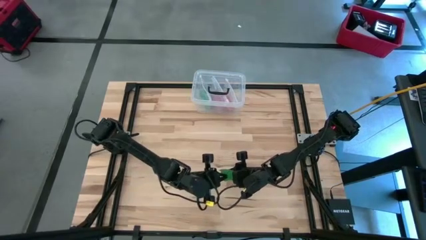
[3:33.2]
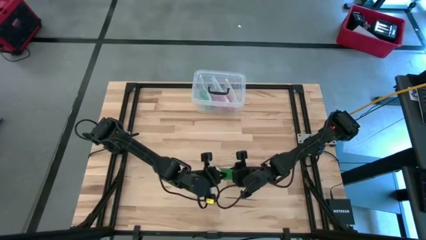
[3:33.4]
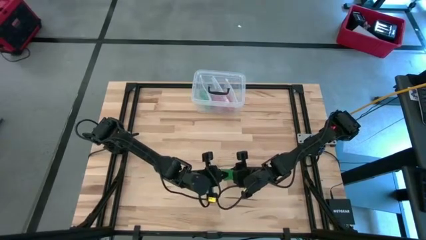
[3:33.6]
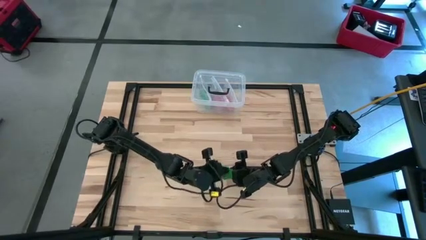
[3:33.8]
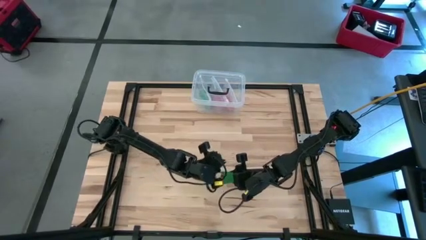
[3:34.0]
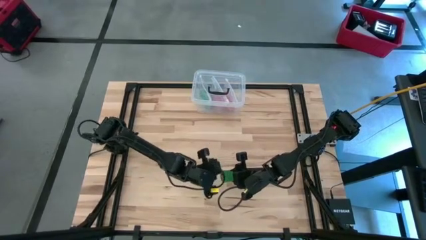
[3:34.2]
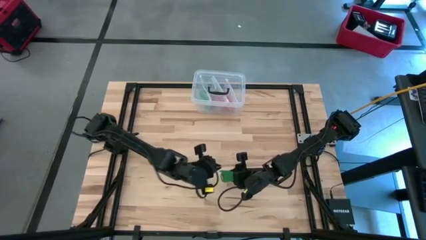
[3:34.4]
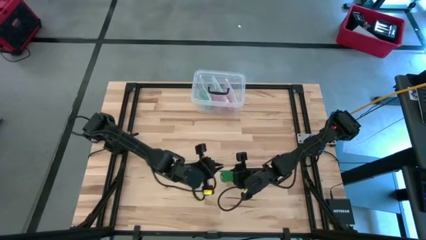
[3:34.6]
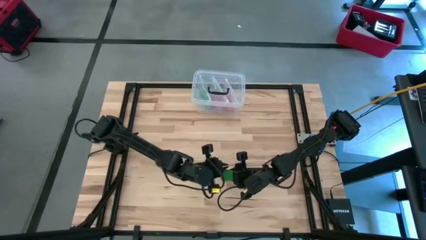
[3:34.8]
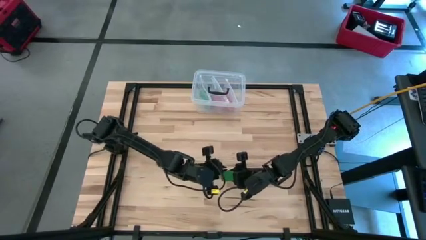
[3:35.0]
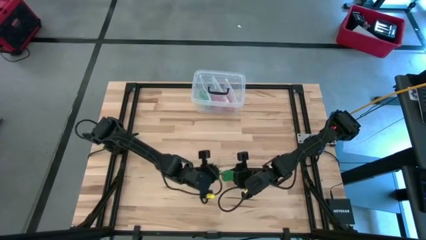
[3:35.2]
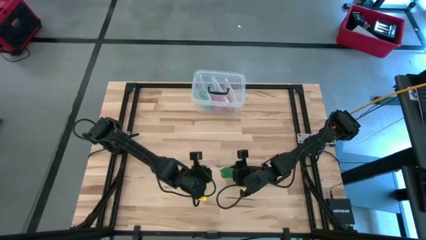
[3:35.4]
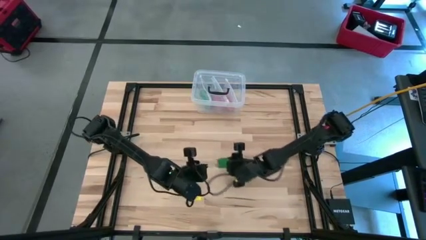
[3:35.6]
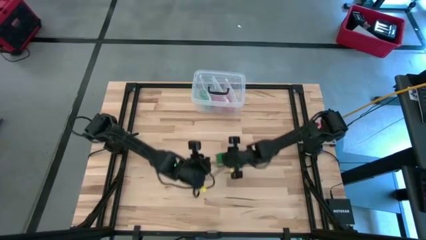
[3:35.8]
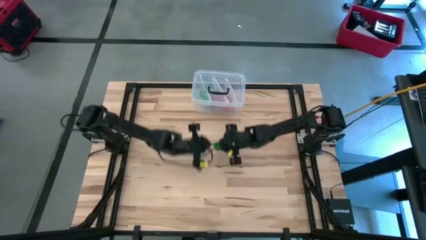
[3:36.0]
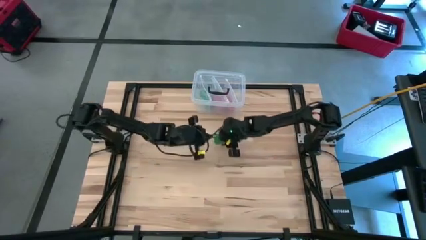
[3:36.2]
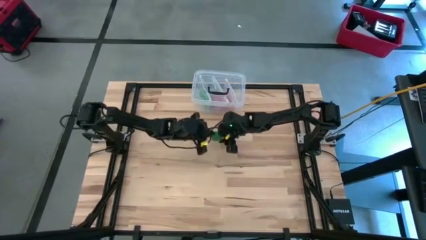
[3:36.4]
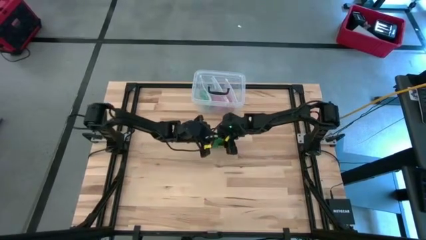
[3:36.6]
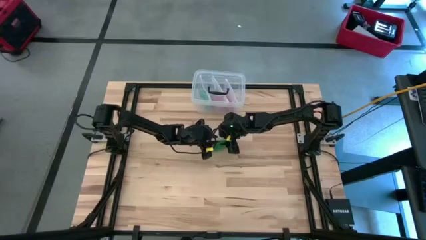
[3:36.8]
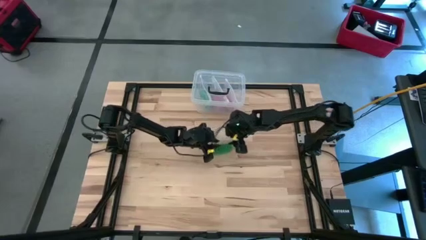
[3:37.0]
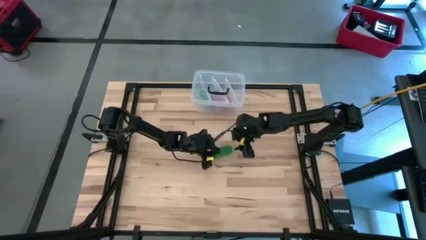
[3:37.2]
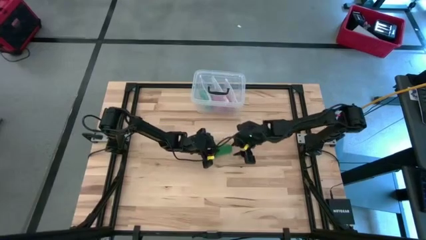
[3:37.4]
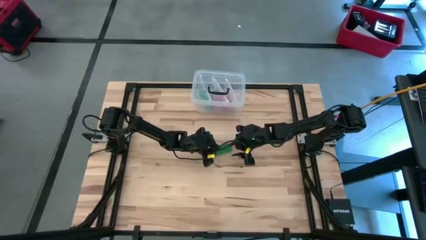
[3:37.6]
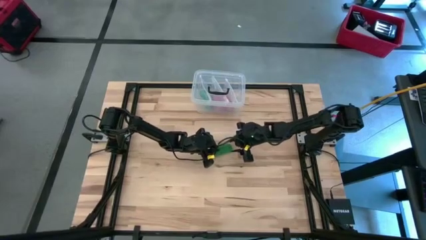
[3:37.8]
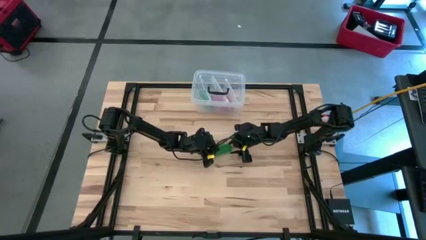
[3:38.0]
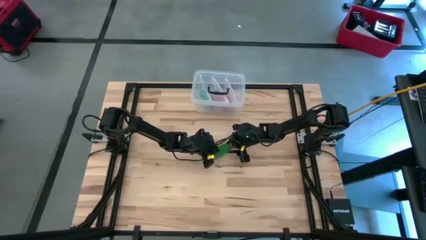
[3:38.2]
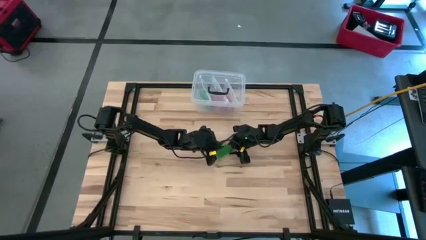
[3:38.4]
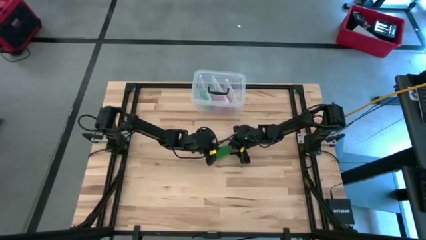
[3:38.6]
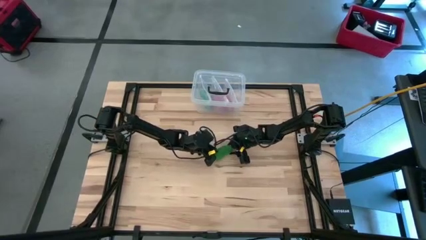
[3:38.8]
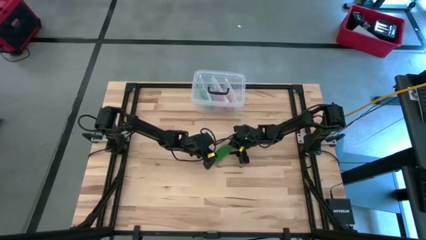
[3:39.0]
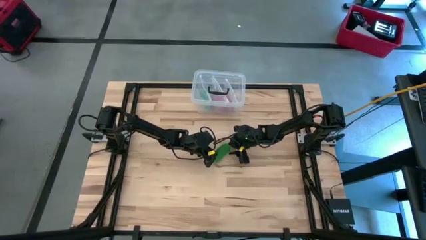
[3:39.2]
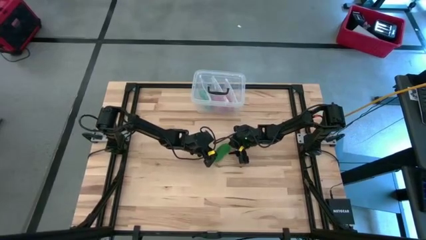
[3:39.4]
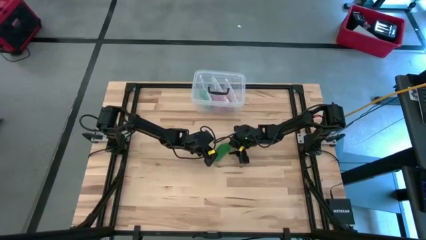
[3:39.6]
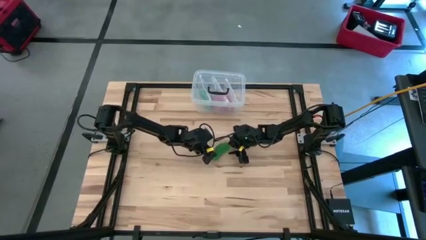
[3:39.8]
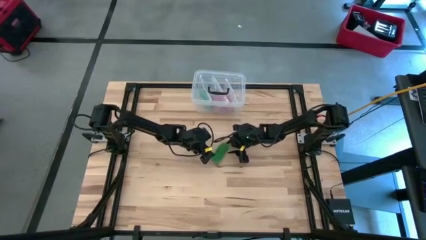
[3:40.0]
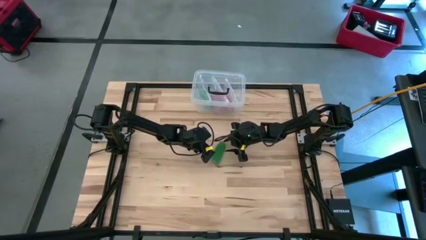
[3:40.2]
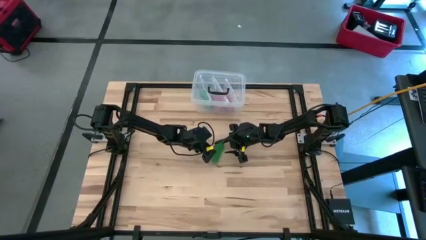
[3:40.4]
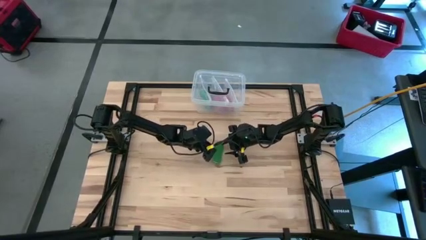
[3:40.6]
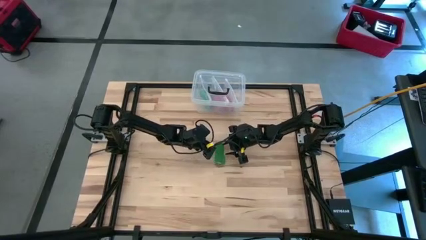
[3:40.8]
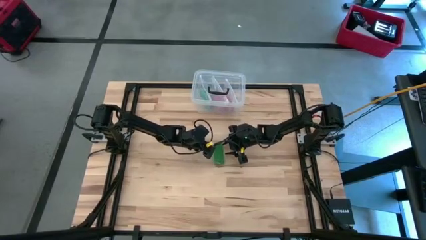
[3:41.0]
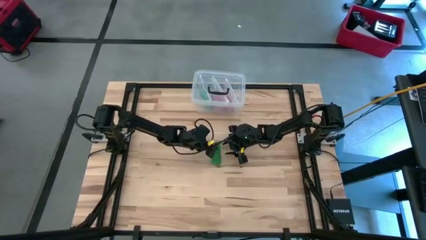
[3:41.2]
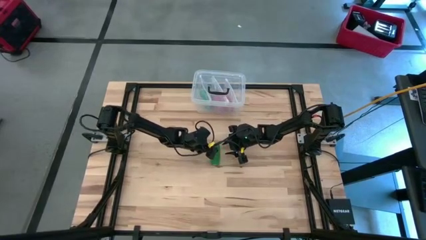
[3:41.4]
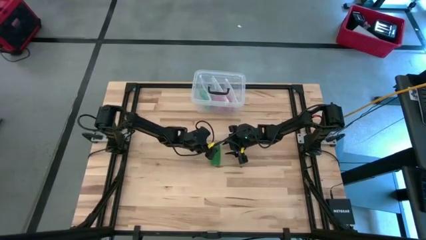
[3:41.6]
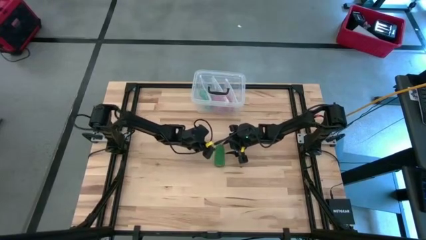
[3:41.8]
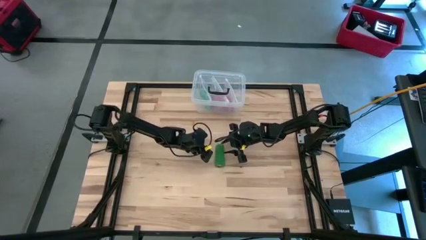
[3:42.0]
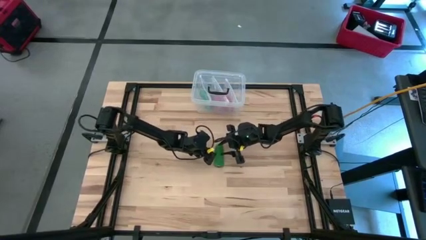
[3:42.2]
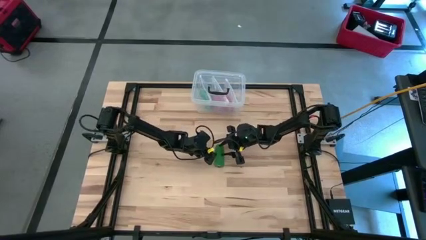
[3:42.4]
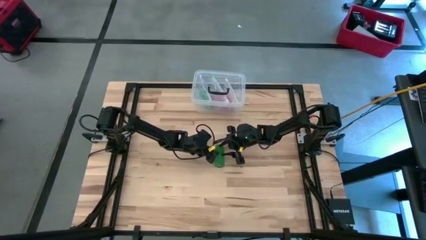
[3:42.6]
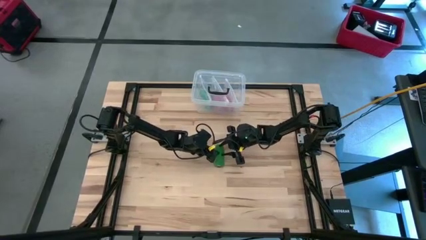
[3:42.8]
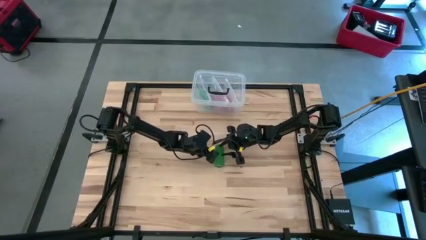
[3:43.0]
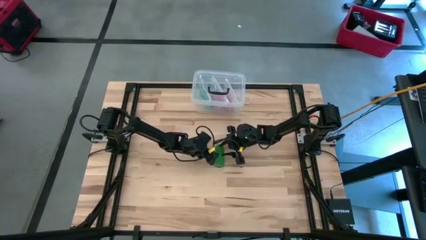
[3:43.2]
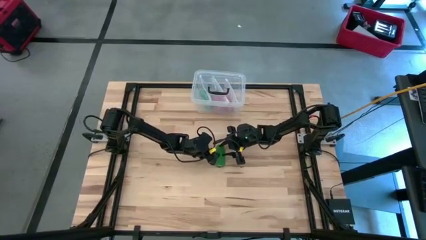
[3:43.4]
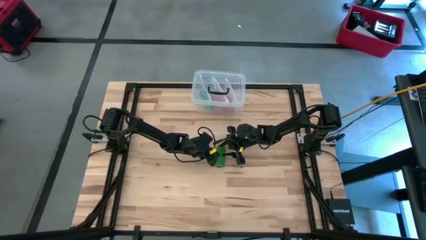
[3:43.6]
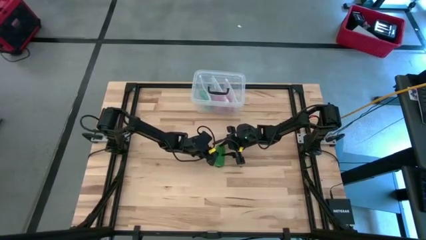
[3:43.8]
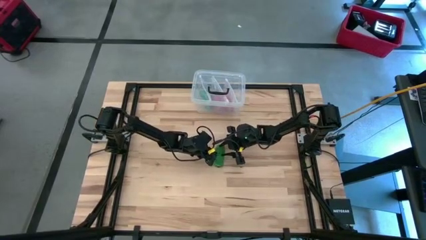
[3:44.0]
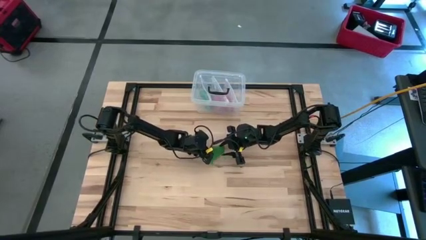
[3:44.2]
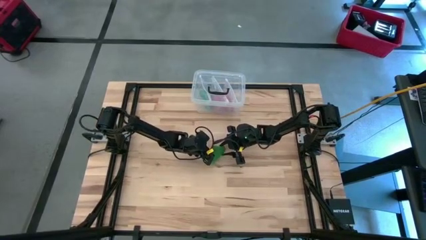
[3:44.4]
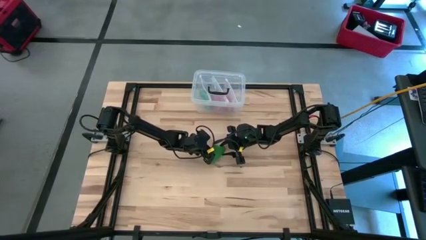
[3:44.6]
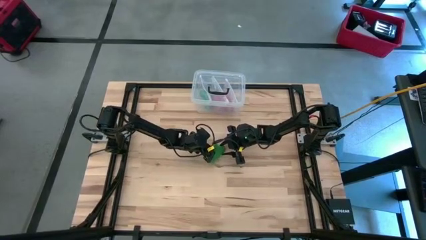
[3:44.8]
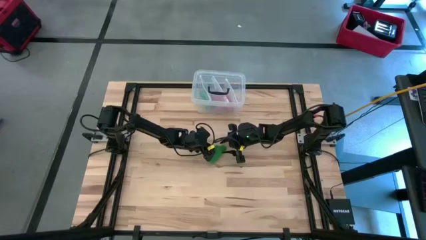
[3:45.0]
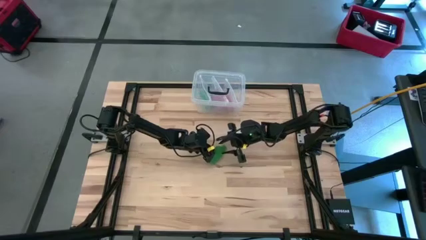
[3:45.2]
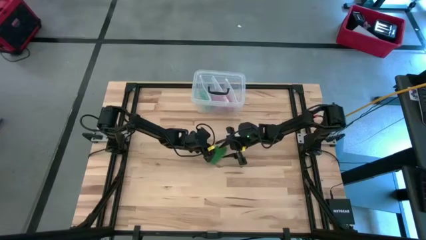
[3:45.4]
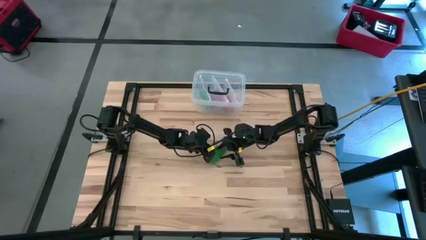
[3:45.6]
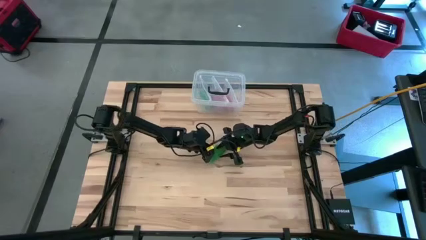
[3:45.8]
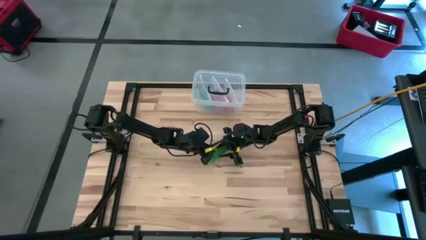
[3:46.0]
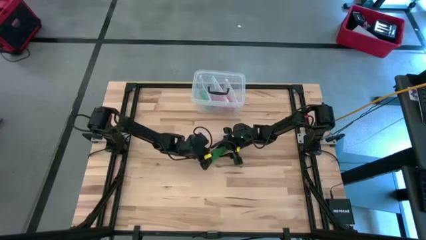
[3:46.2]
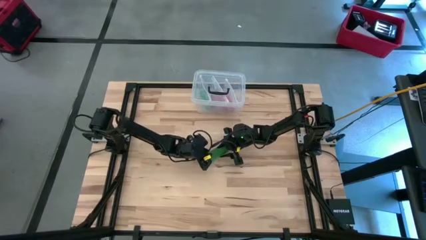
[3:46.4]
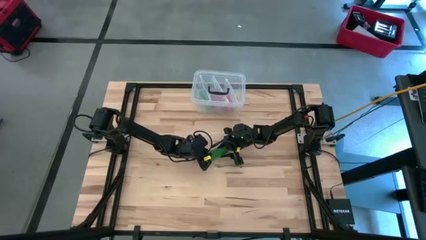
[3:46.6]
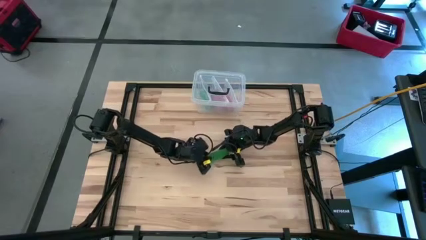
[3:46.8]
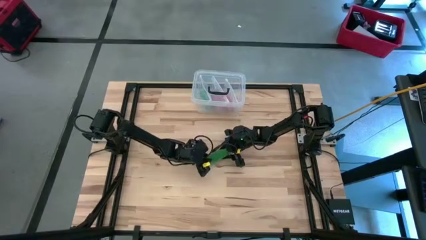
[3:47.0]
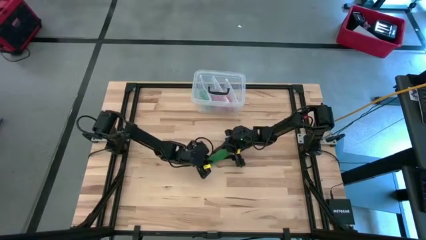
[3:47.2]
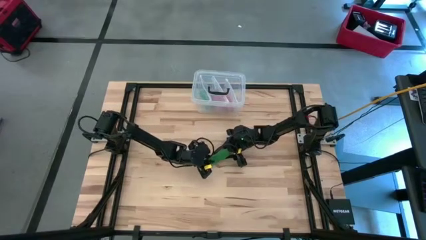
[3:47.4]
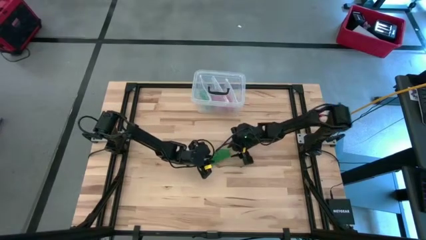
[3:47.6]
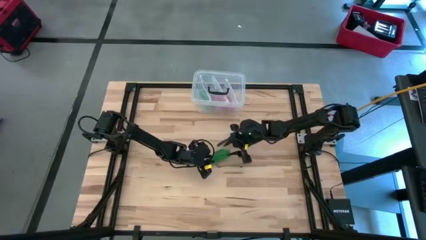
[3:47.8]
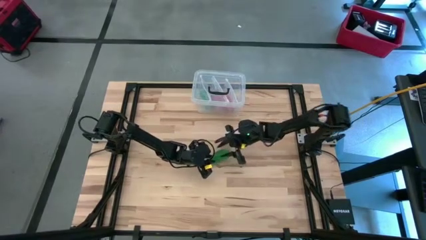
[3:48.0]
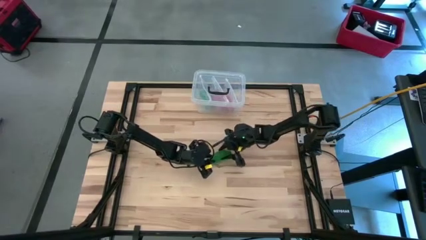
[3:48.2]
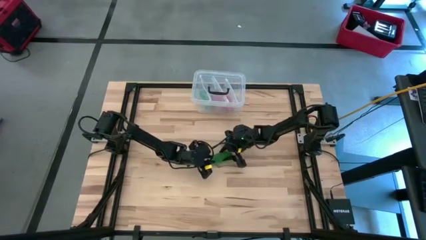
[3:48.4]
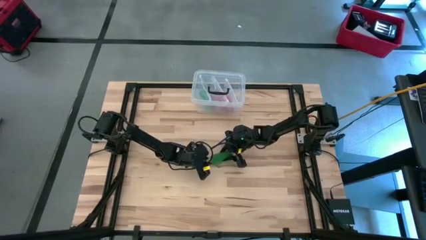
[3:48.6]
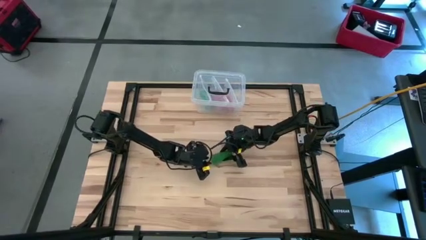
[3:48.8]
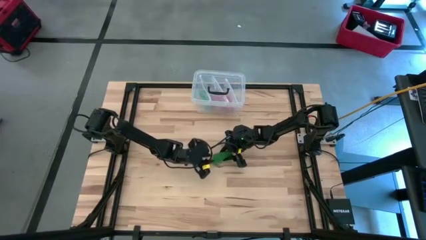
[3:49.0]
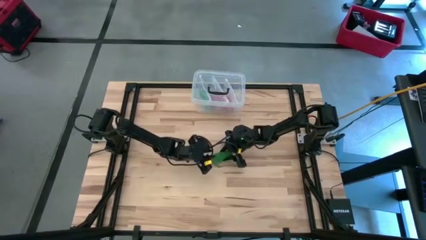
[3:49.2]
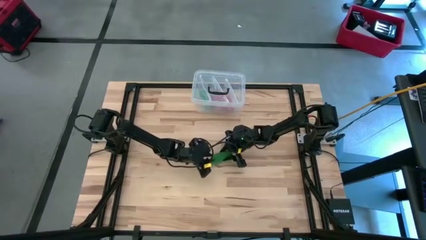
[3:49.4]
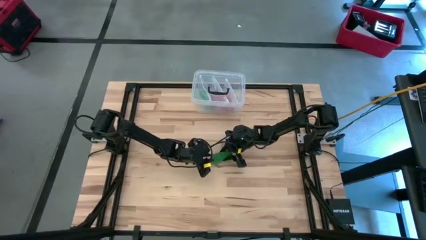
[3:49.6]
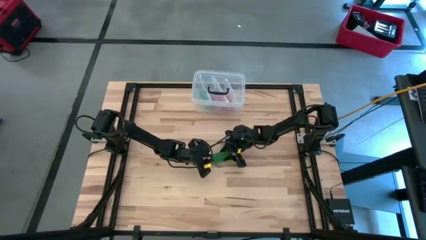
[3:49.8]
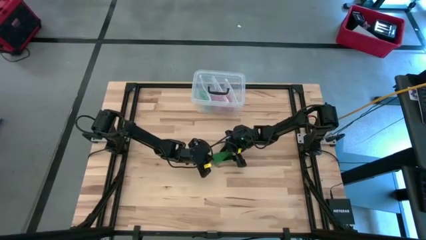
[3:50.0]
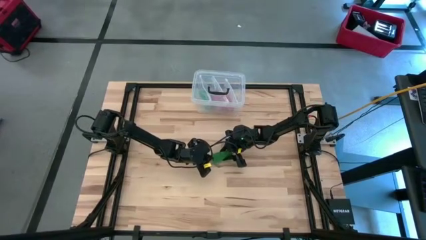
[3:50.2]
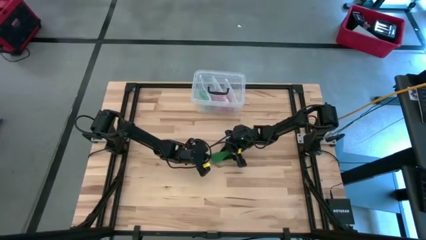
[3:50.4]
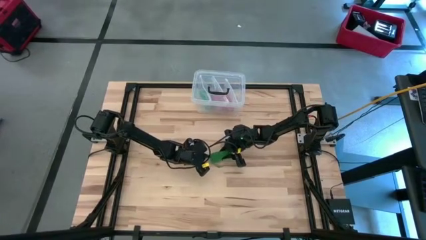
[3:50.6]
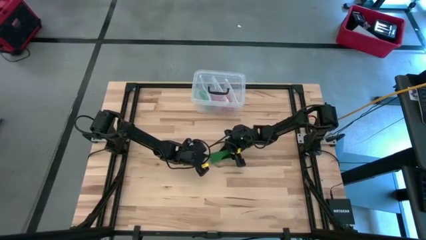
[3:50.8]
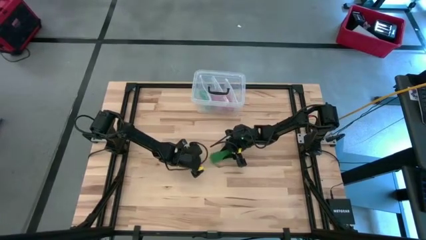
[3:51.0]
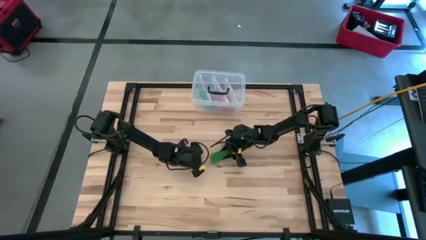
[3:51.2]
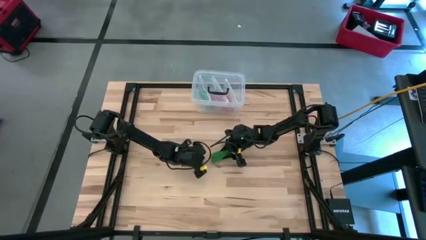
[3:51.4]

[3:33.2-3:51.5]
Task: Roll bandage
Roll the green bandage
